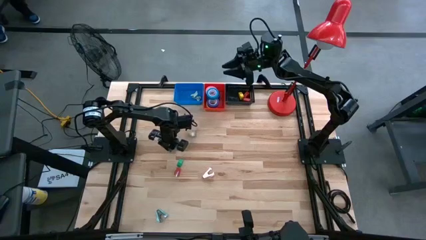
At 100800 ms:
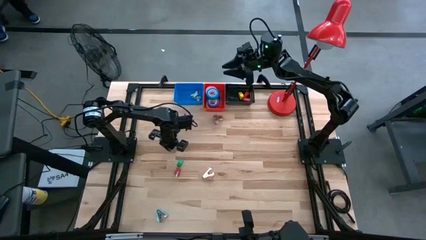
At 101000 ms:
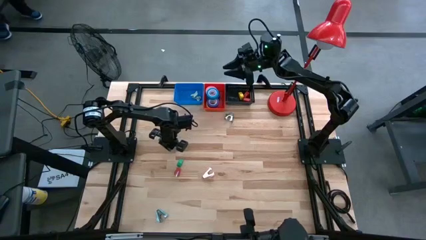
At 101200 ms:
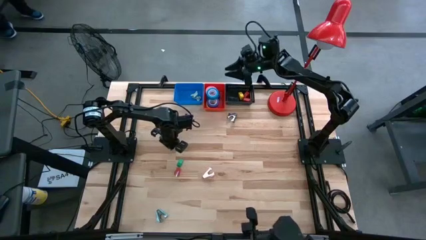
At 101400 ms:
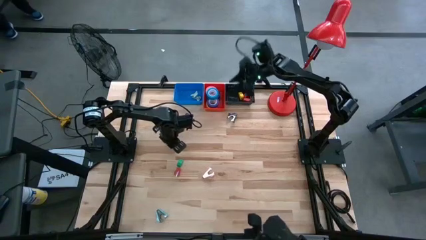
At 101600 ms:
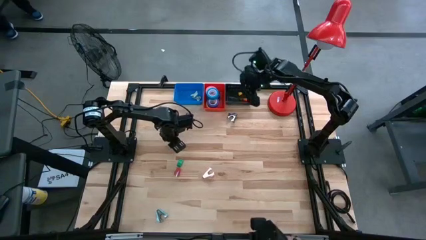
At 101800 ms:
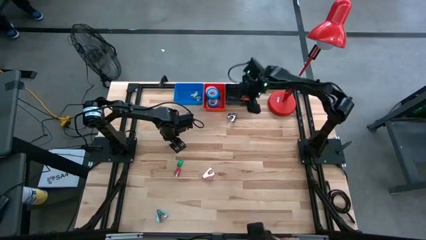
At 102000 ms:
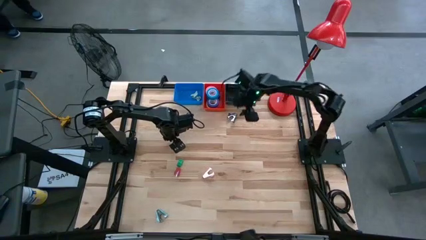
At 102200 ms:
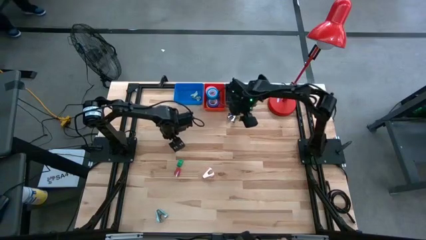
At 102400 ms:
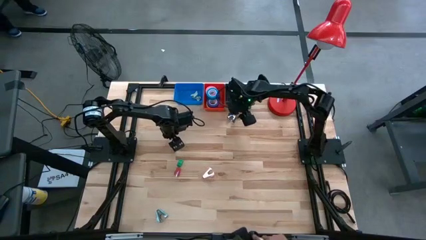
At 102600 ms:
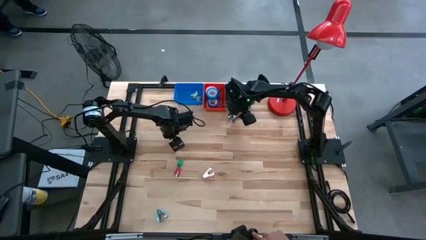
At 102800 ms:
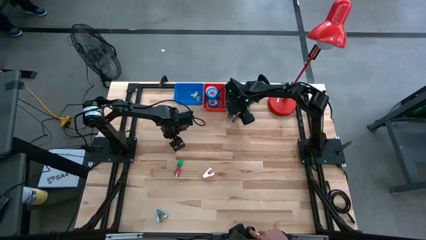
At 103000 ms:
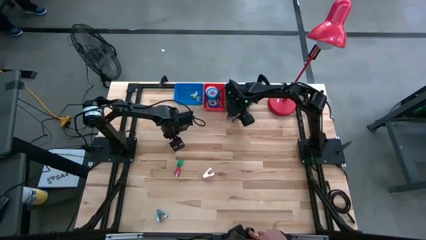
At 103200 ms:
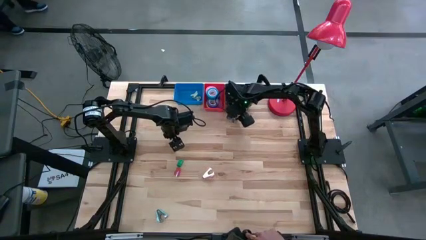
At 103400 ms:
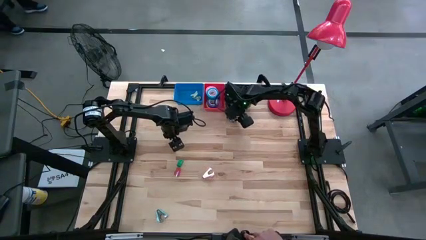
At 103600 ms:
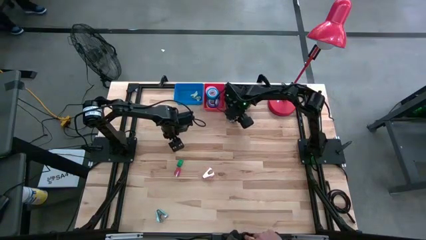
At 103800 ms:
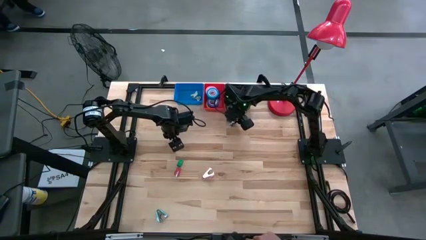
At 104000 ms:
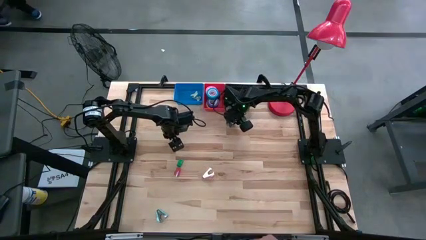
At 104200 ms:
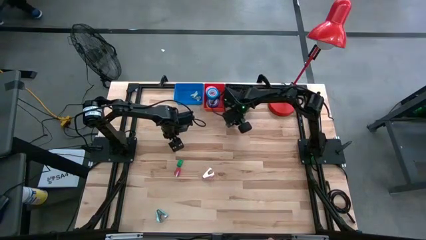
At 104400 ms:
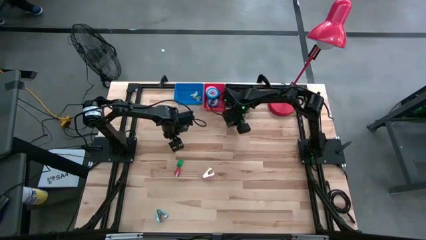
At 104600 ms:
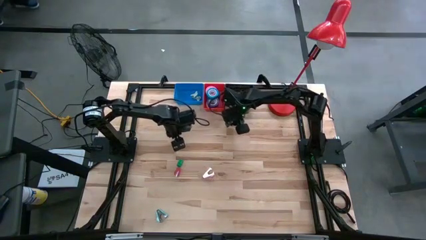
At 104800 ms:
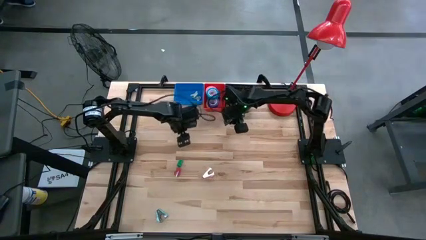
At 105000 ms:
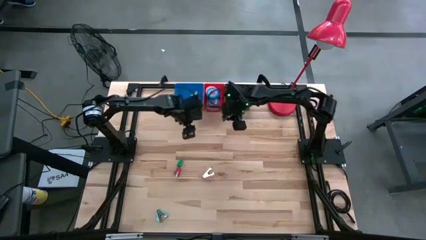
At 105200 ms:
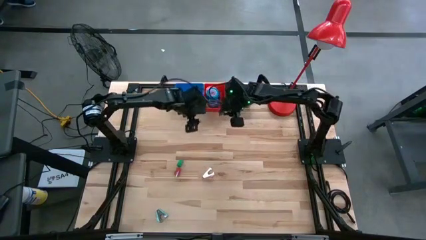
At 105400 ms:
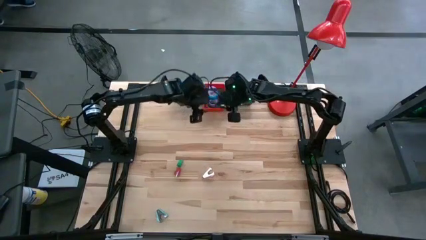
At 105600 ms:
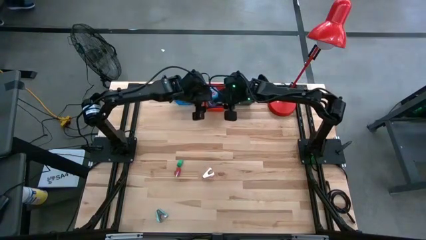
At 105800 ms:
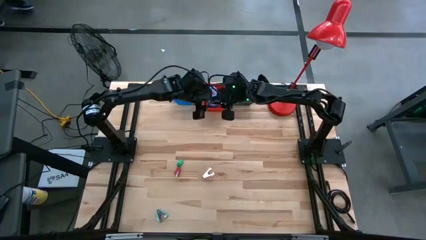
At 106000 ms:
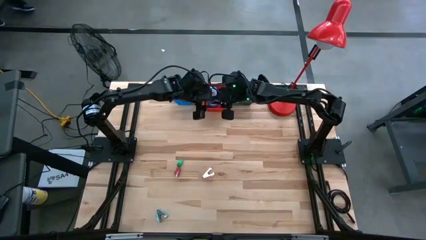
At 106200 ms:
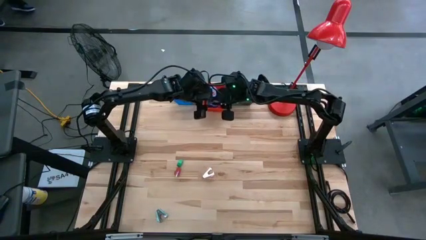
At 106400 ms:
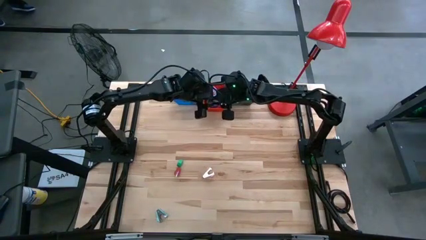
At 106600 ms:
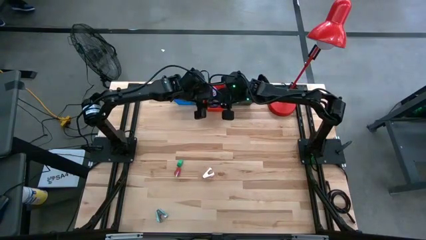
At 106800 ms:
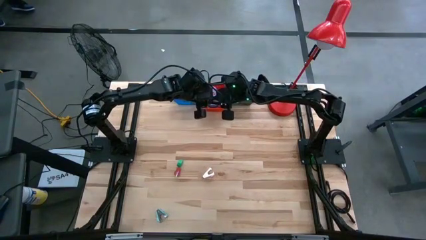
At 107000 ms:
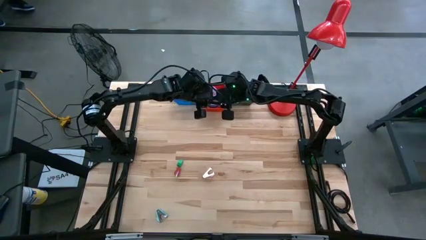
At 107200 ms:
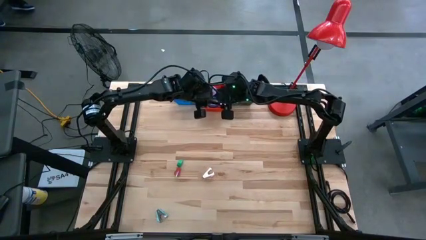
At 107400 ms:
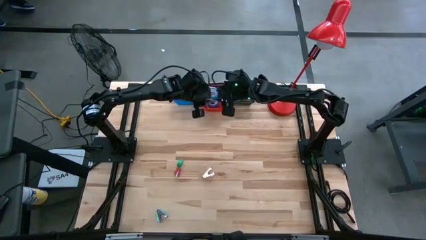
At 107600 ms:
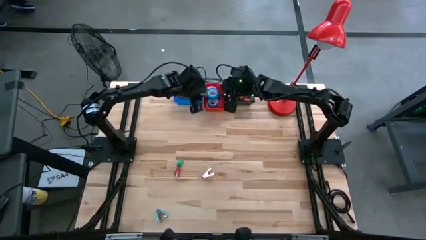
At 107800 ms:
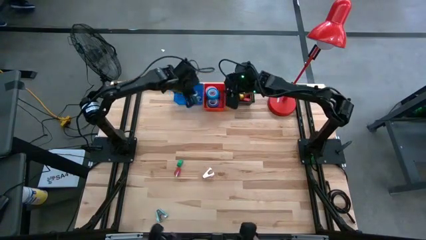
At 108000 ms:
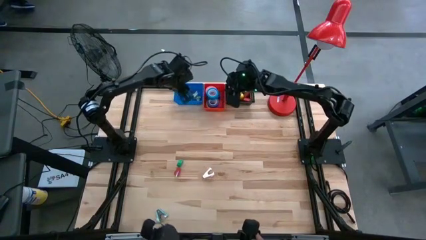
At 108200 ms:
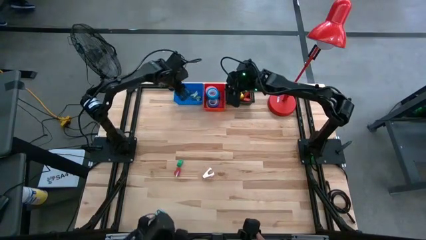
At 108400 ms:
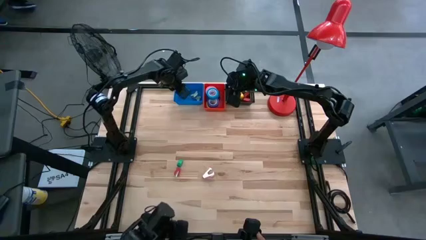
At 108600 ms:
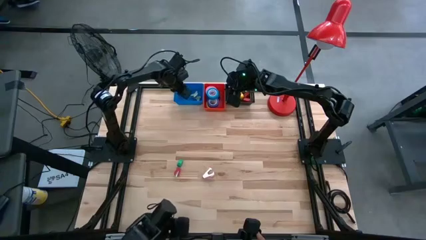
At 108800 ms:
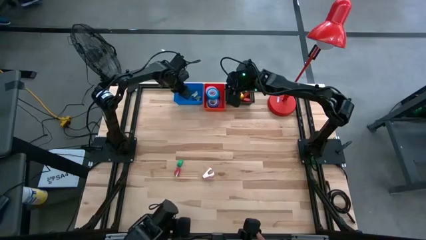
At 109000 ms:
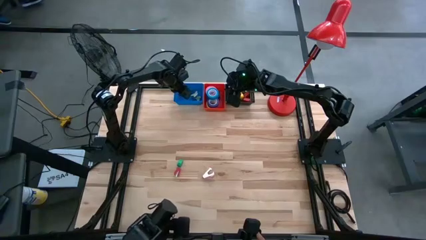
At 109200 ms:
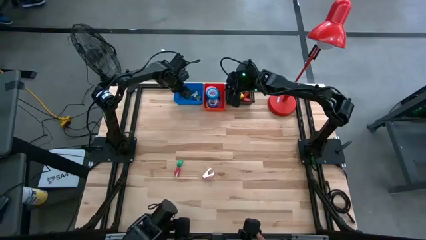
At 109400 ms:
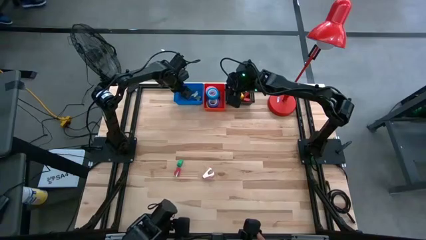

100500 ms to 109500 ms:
Task: Pick and place Stapler, Stapler remover, tape
Put the black staple remover into the blue basket

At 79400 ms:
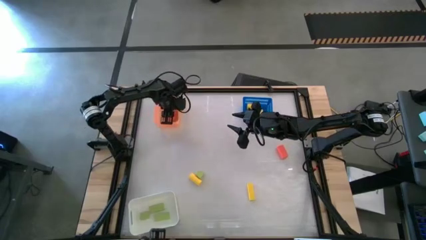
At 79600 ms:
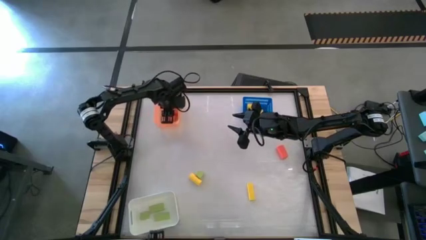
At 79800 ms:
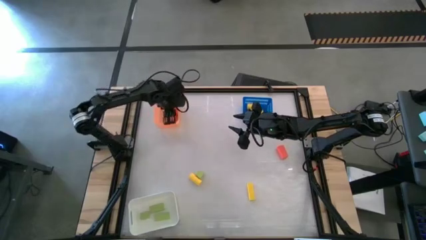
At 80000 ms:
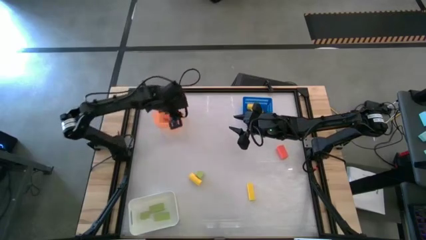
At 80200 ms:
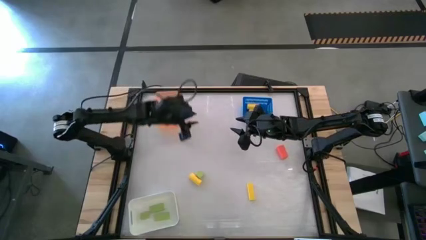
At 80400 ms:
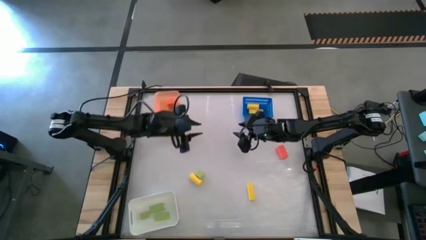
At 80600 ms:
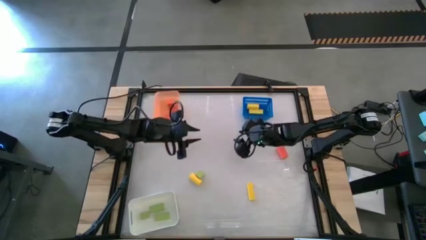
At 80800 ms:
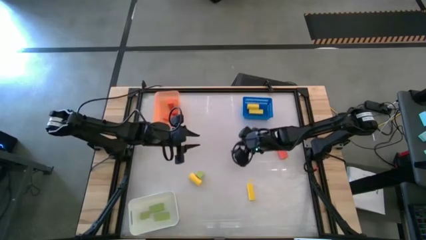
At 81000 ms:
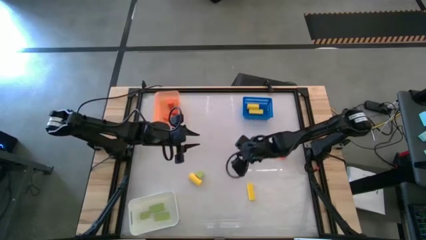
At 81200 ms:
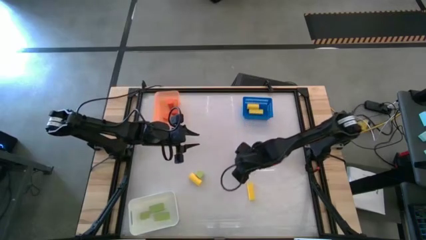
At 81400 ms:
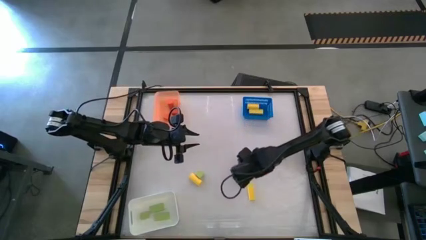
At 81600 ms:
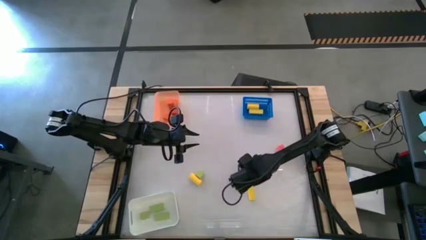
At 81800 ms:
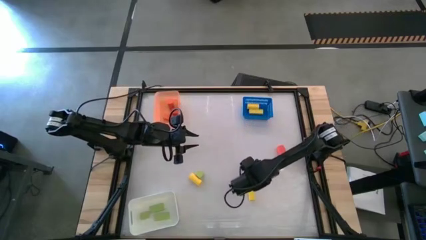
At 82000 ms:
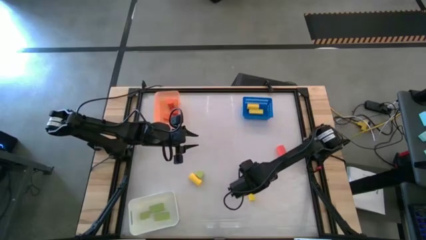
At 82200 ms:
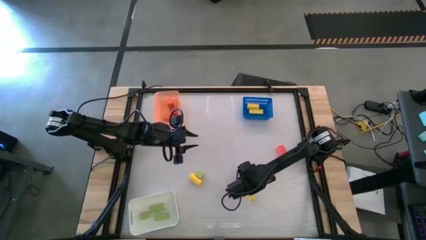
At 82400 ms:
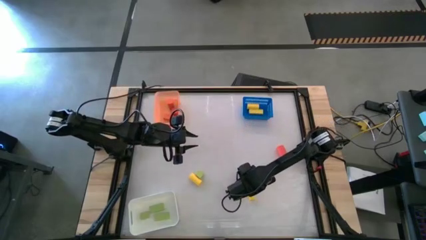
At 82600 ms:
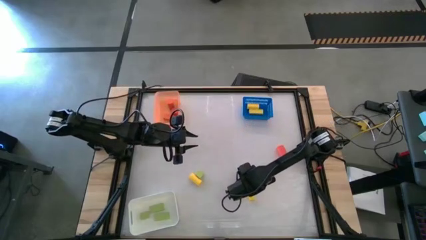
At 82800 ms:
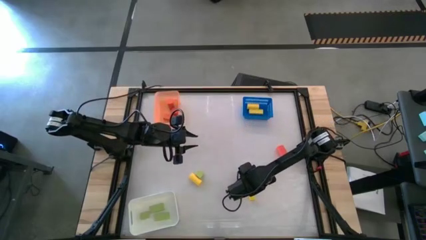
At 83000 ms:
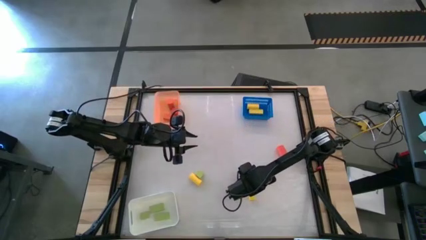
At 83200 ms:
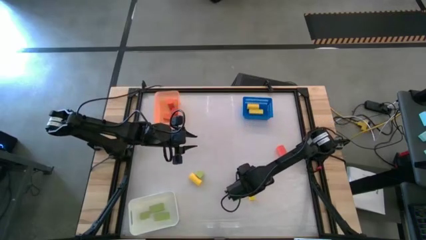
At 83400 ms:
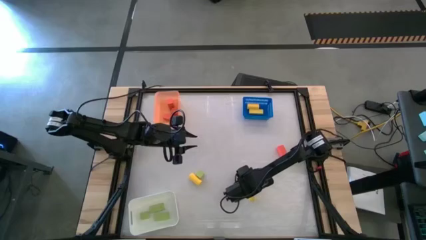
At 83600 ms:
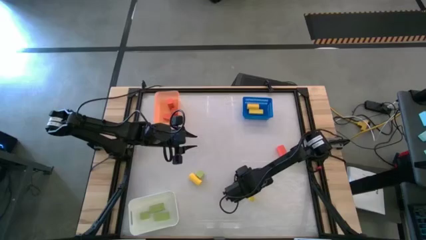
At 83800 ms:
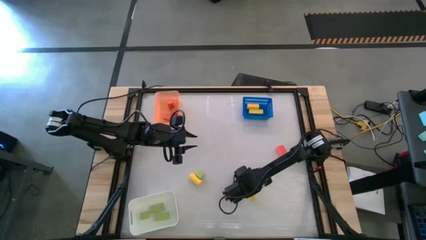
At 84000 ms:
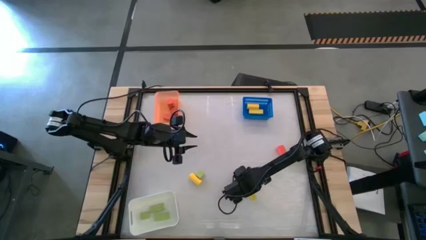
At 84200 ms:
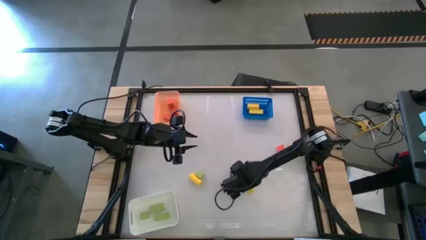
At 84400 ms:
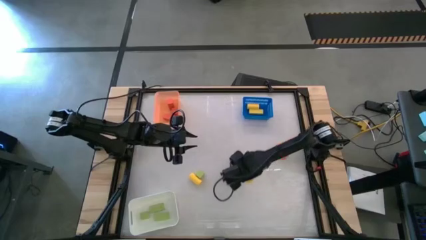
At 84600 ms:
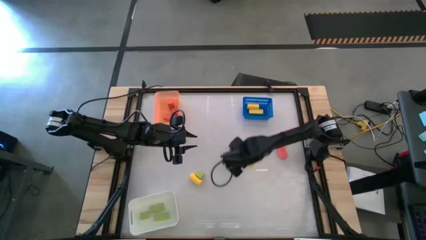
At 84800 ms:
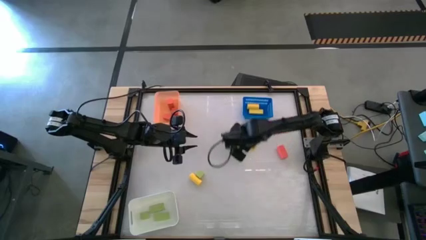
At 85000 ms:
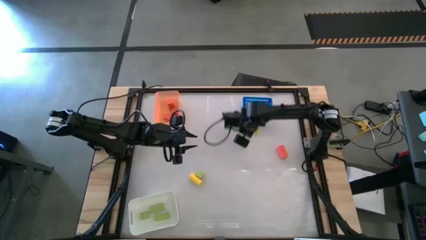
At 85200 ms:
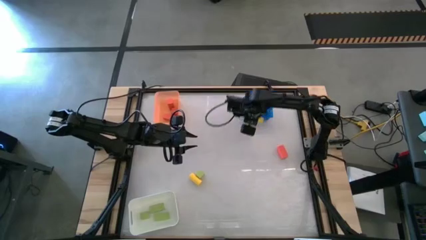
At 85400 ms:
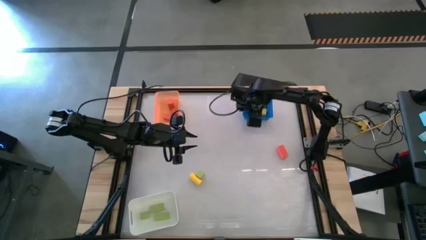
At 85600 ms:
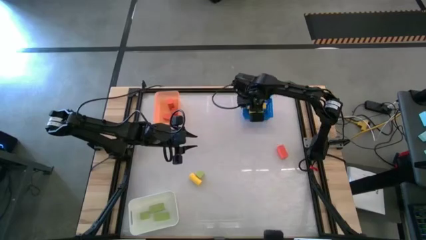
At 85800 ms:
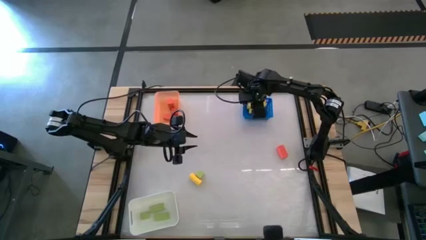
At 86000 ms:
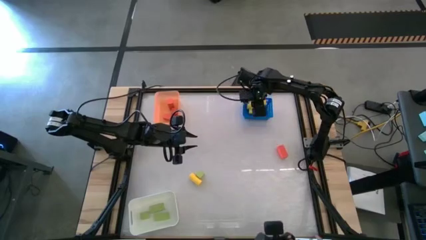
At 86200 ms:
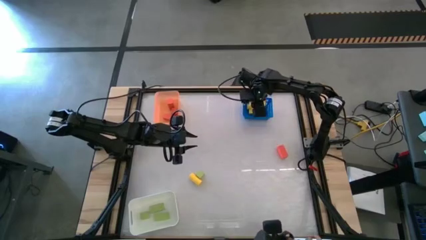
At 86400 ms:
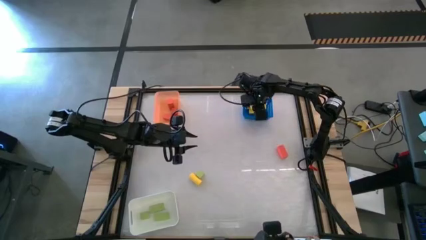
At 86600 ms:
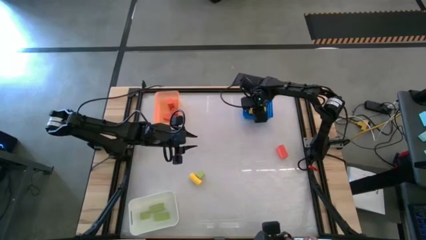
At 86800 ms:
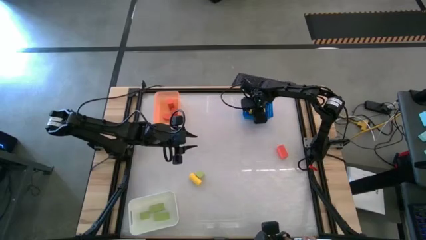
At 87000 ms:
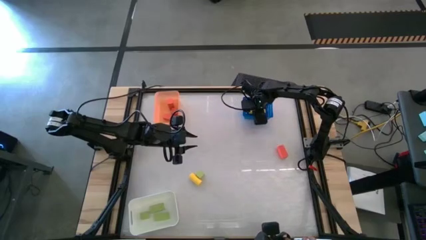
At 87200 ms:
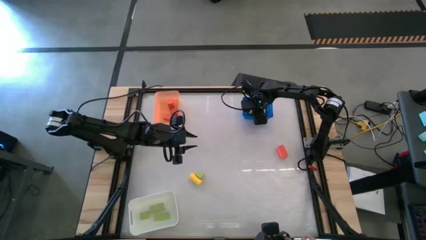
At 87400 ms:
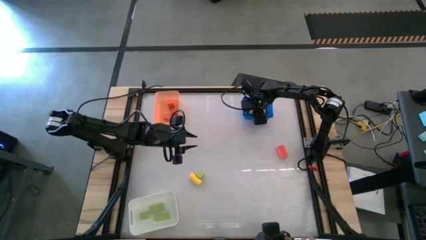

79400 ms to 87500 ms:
Task: Sort & place blocks by color
Put the yellow wooden block into the blue basket
